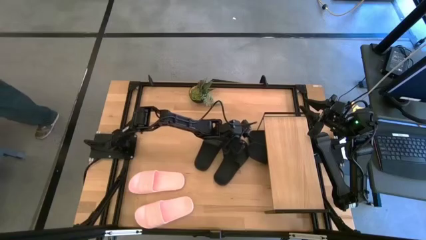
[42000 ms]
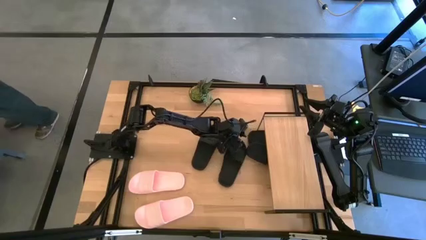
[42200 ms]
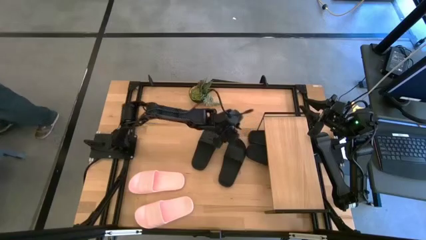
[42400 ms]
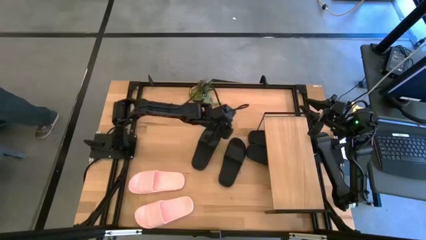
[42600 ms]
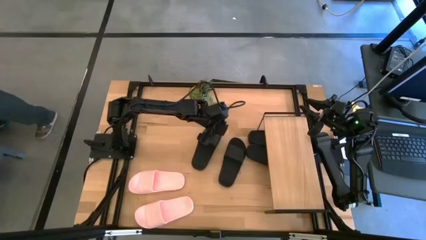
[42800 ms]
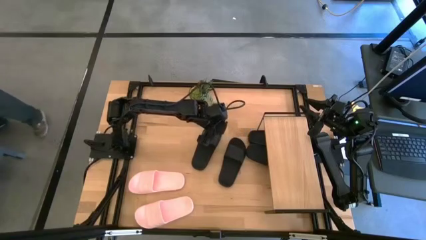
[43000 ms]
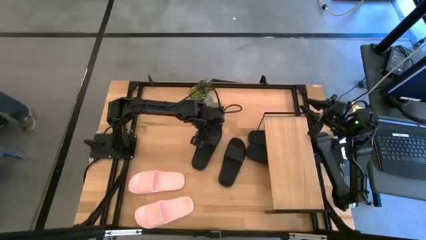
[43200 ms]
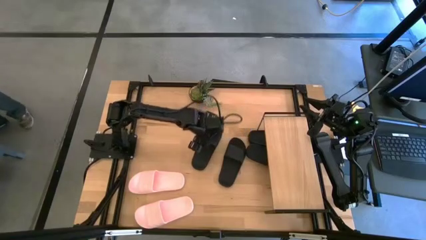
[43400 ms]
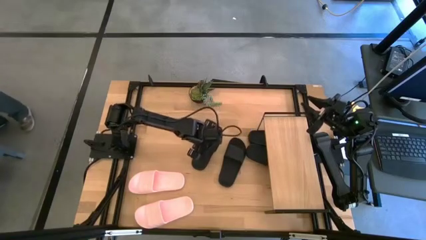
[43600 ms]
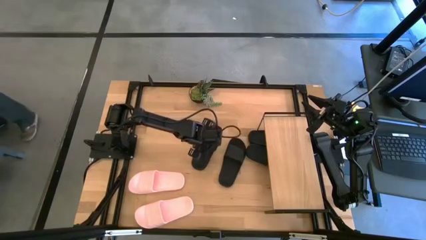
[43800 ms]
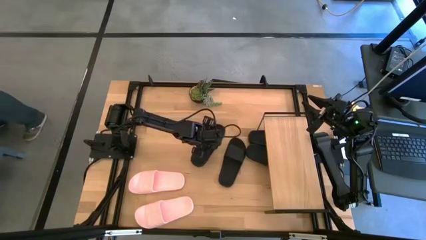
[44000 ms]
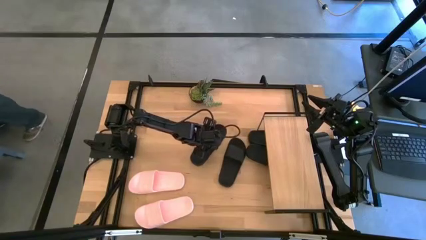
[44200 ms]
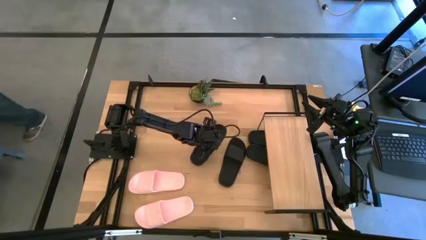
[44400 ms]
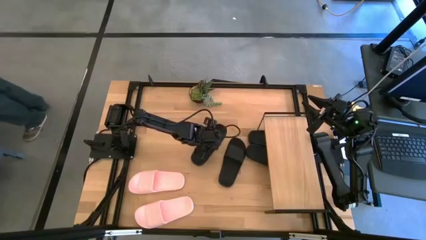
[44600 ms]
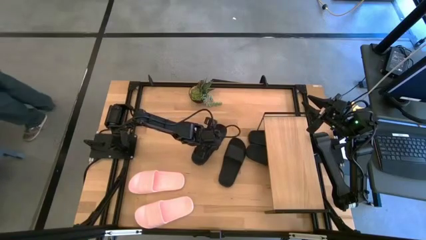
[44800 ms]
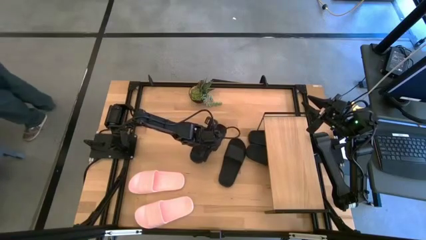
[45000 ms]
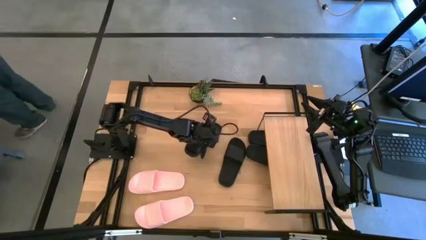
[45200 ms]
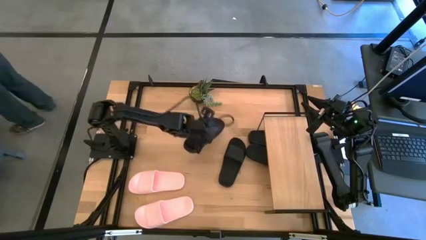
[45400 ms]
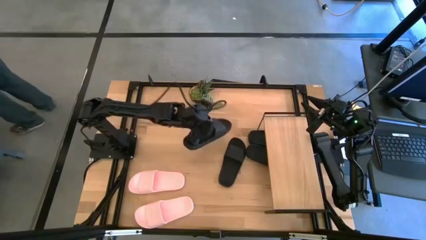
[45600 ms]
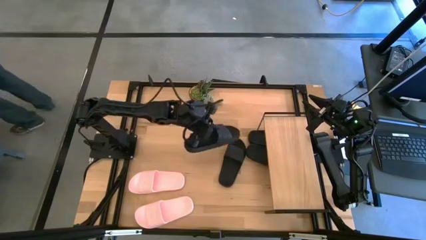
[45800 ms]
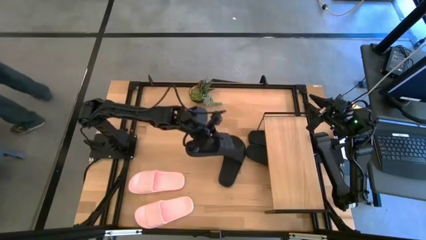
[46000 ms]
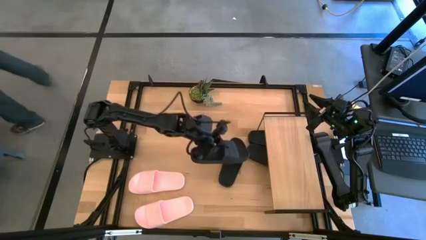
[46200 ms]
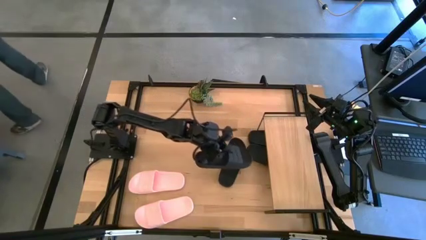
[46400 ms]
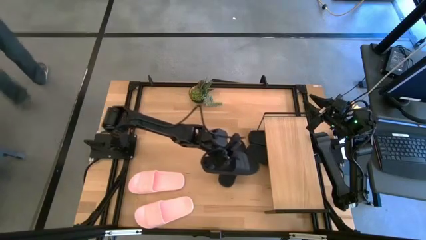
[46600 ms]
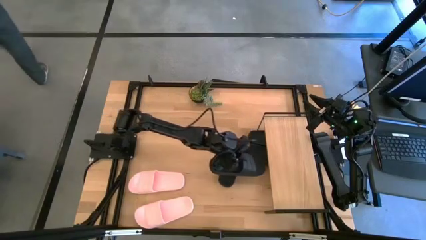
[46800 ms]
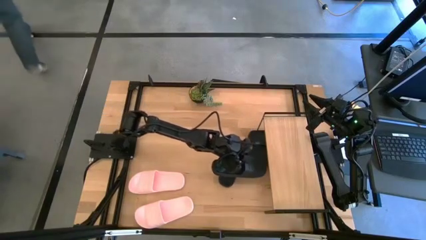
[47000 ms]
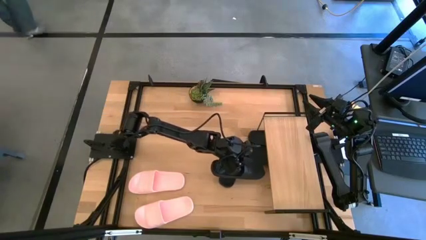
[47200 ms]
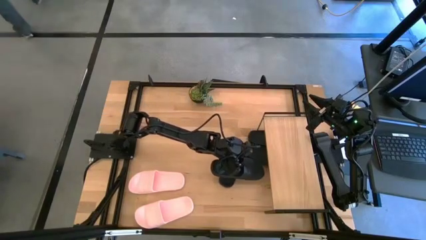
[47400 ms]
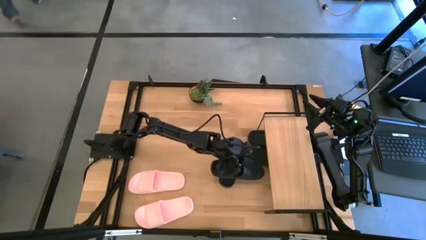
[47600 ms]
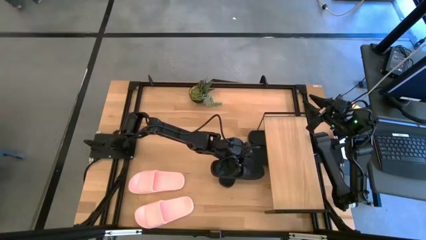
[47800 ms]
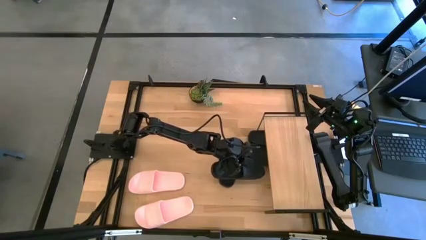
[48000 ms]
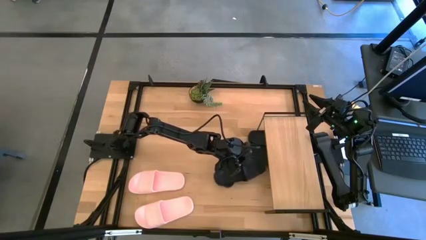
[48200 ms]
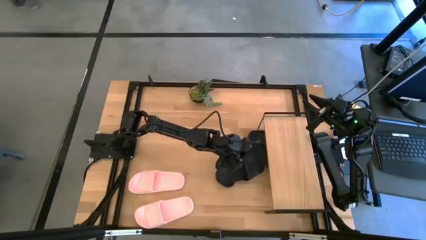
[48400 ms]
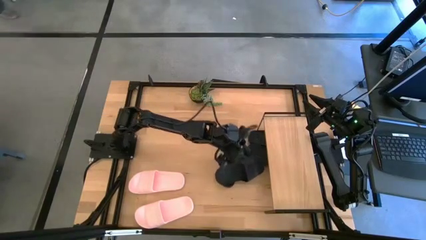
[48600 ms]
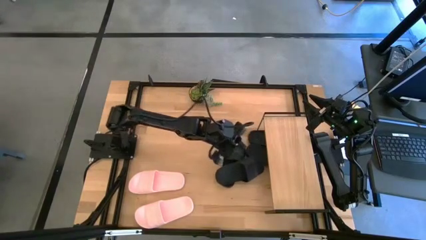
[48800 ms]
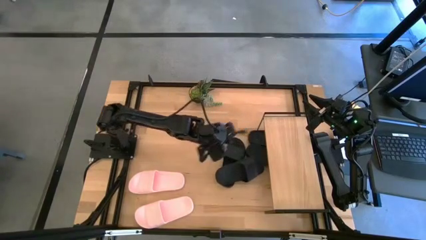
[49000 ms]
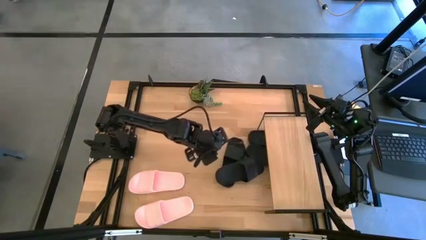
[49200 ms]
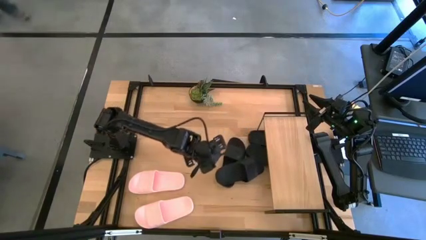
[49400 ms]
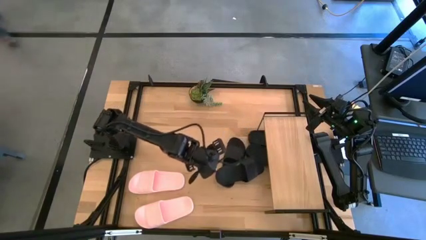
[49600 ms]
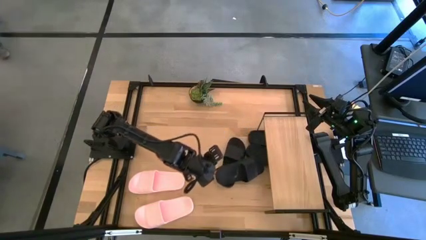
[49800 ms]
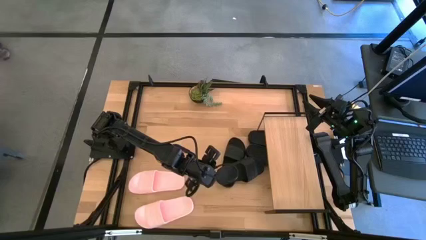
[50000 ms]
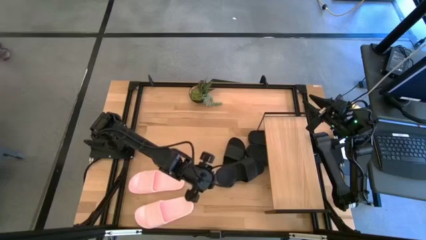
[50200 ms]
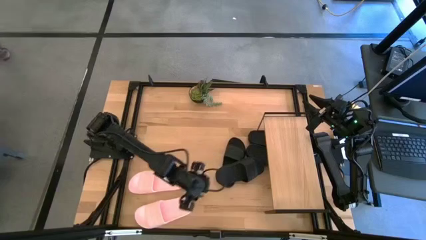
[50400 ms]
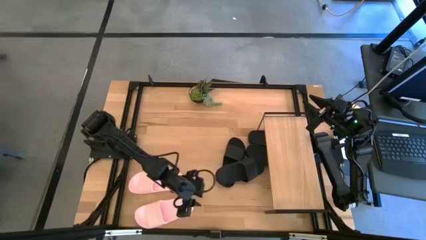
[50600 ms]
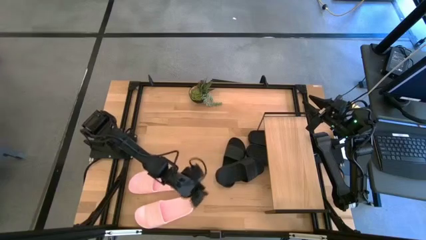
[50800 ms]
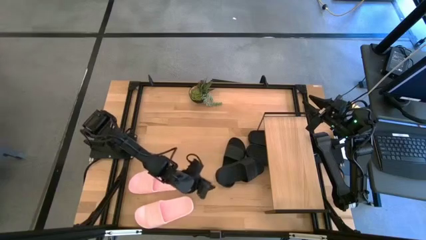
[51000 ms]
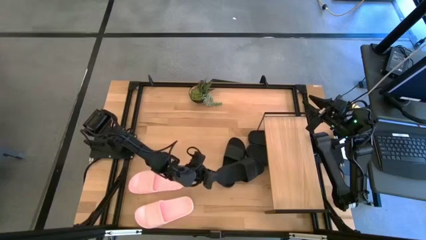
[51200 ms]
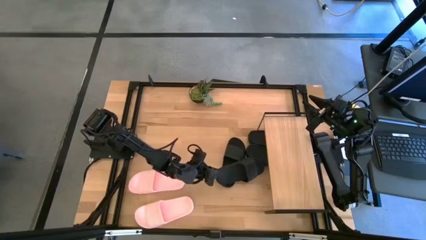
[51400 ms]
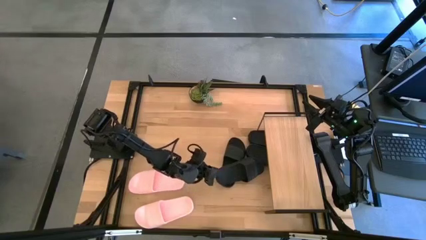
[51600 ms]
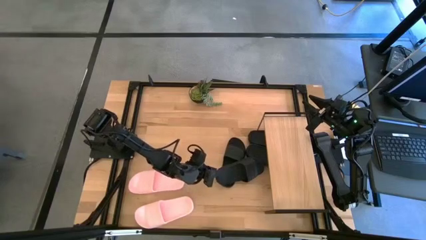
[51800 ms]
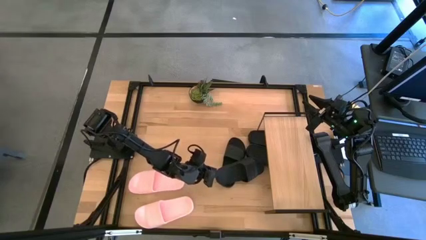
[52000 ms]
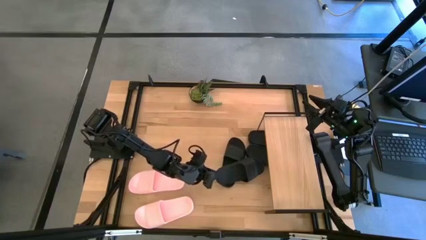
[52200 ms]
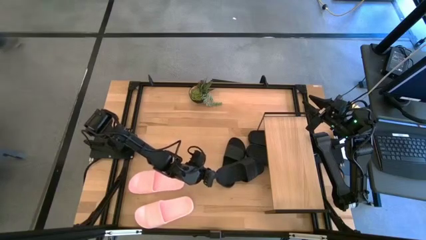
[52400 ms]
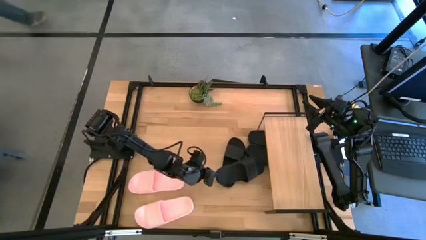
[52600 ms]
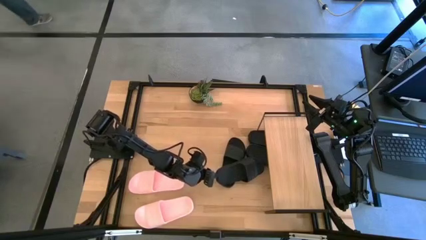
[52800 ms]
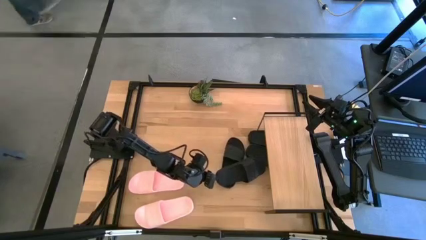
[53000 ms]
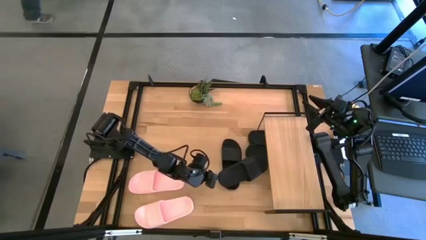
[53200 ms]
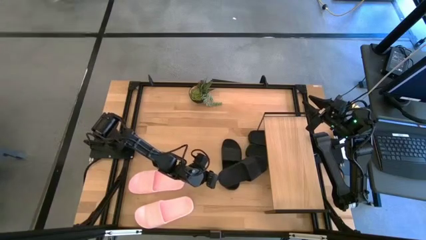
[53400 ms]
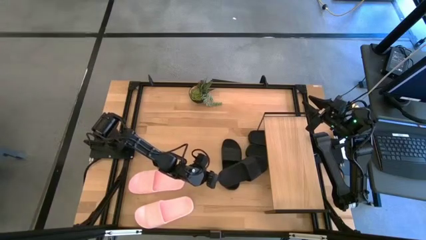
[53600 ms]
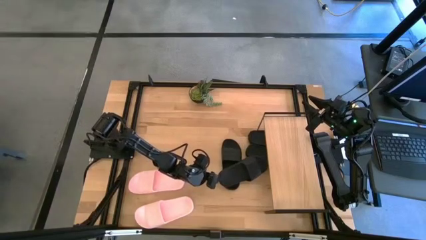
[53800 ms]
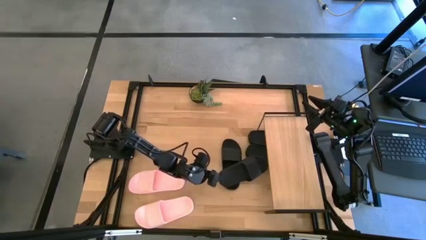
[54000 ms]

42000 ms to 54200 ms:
Task: Pick and place slides into the shelf
Put the black slides under the shelf
